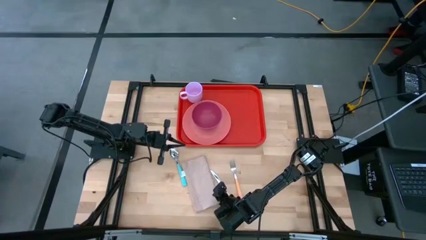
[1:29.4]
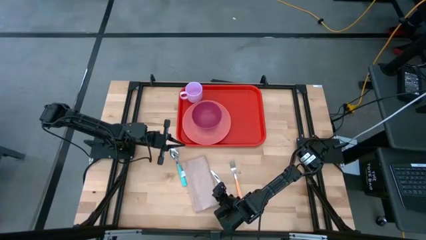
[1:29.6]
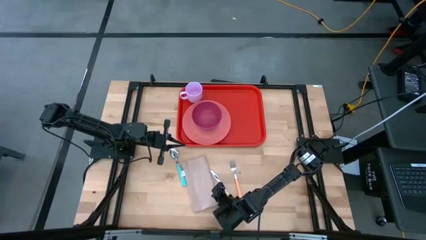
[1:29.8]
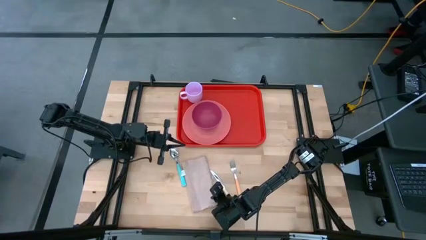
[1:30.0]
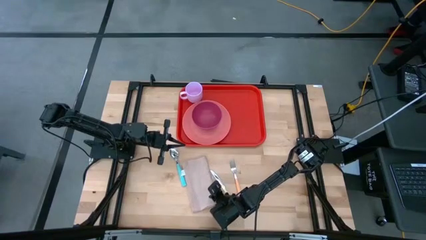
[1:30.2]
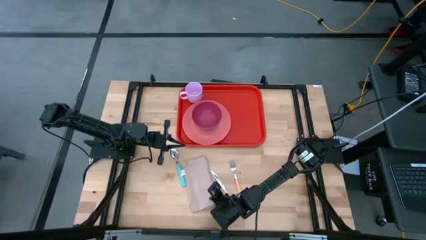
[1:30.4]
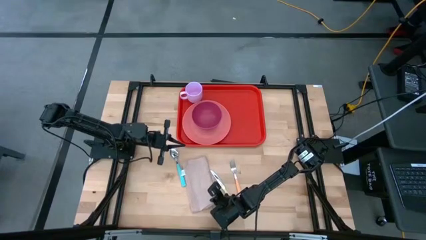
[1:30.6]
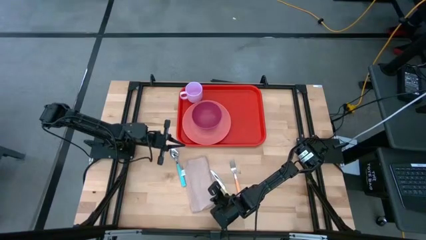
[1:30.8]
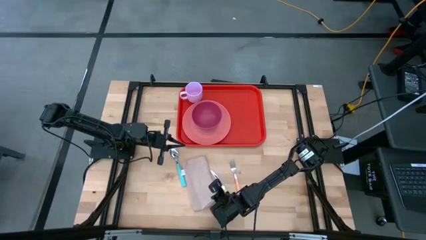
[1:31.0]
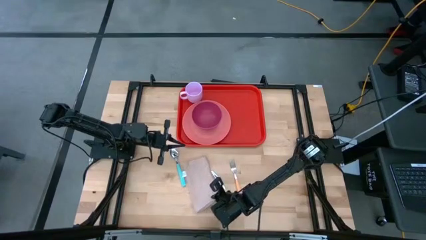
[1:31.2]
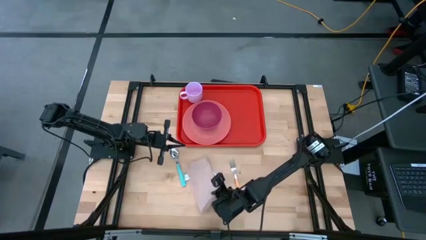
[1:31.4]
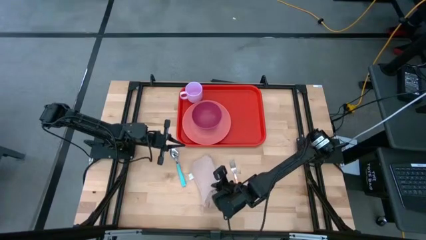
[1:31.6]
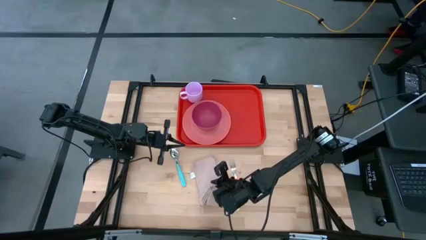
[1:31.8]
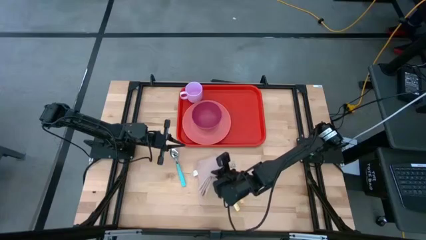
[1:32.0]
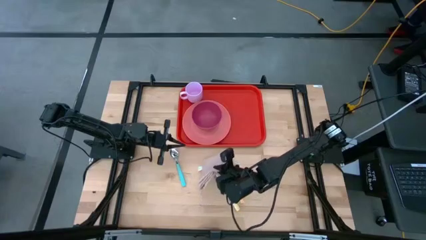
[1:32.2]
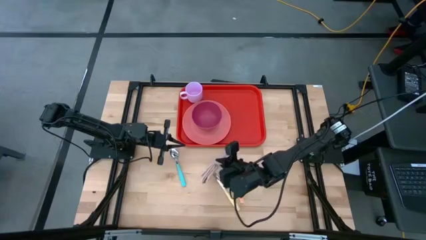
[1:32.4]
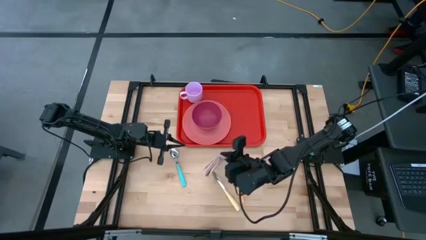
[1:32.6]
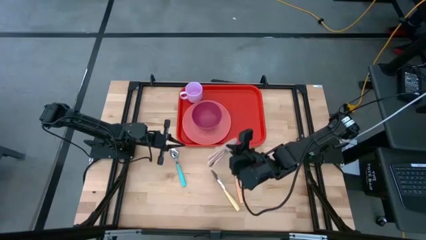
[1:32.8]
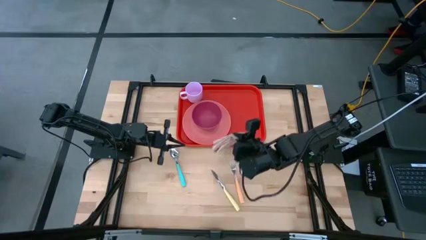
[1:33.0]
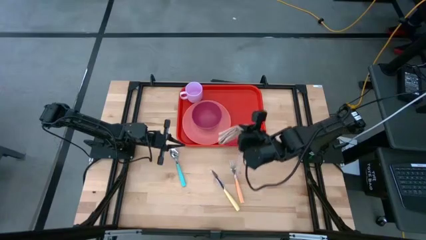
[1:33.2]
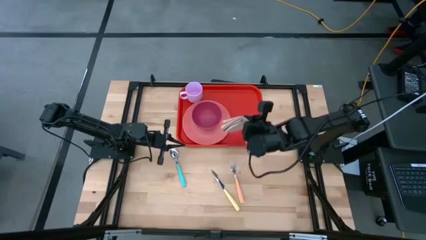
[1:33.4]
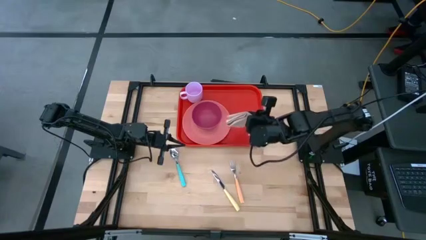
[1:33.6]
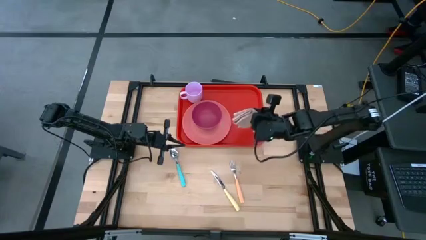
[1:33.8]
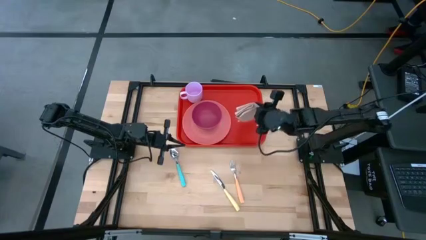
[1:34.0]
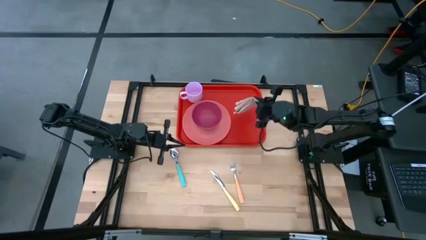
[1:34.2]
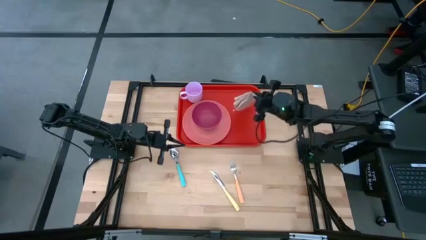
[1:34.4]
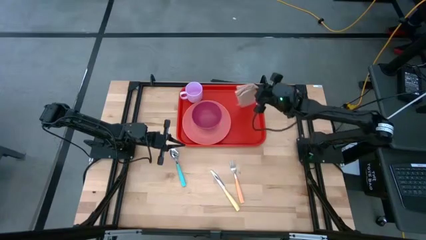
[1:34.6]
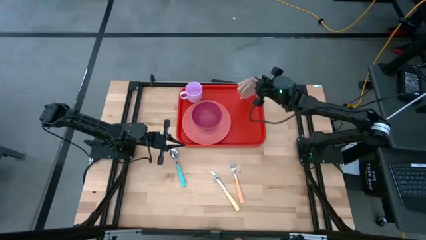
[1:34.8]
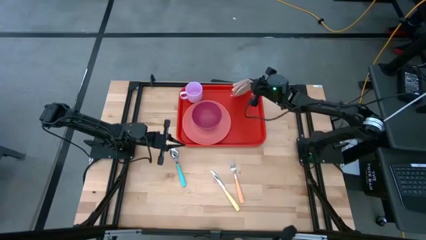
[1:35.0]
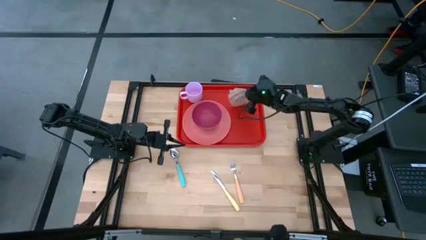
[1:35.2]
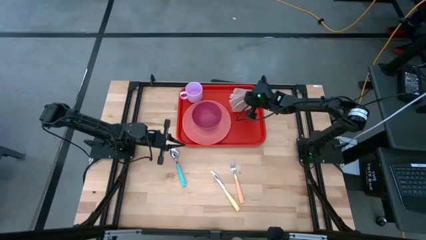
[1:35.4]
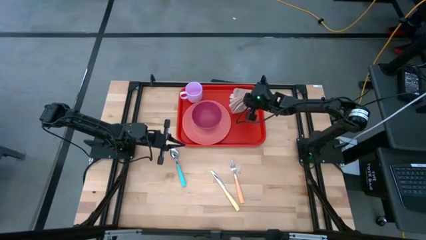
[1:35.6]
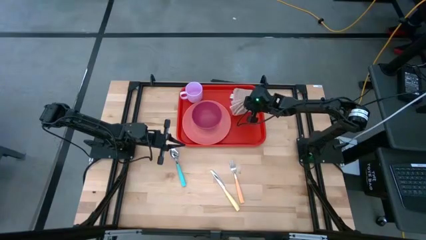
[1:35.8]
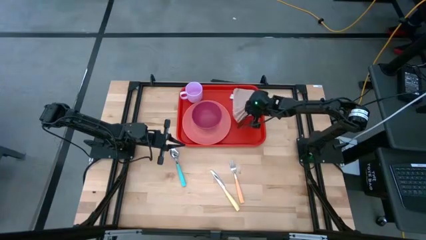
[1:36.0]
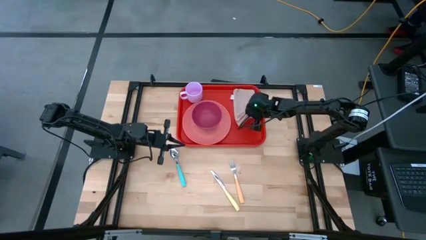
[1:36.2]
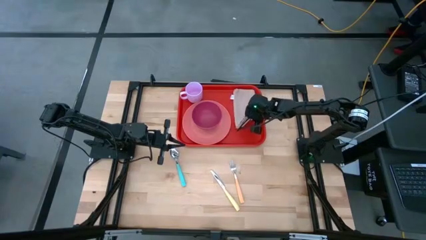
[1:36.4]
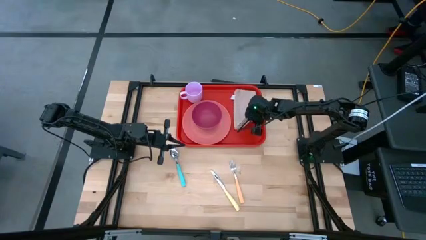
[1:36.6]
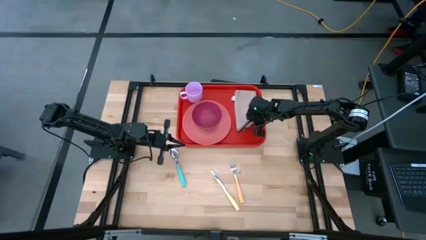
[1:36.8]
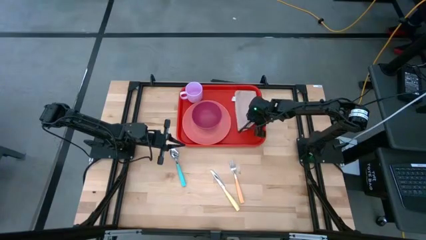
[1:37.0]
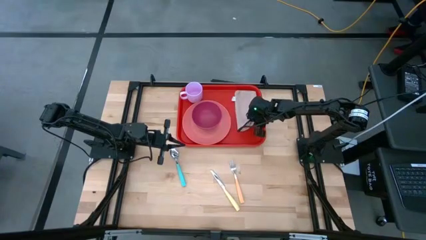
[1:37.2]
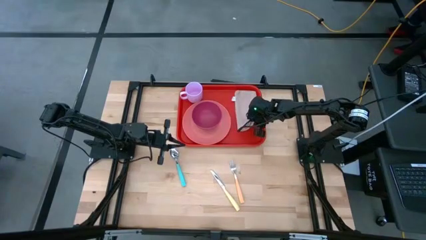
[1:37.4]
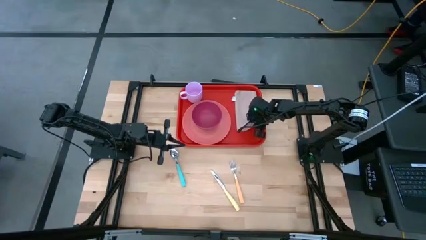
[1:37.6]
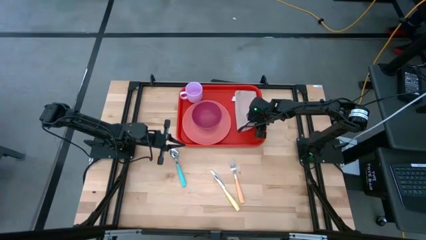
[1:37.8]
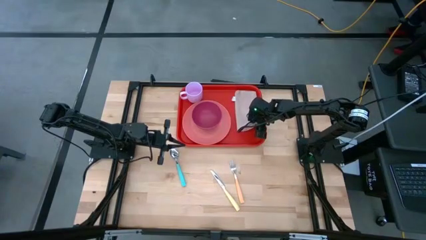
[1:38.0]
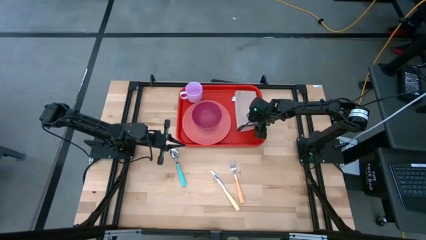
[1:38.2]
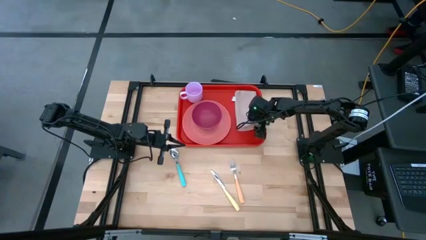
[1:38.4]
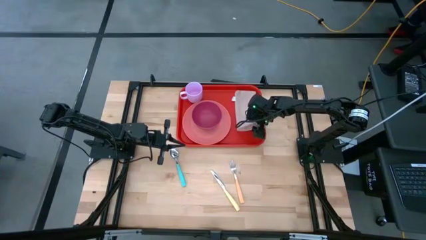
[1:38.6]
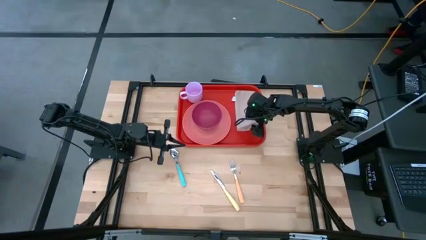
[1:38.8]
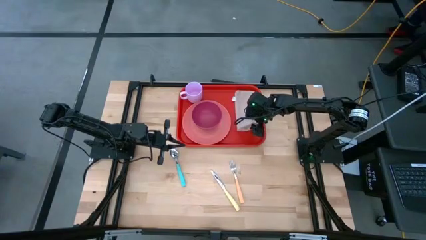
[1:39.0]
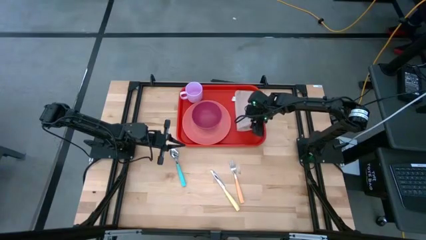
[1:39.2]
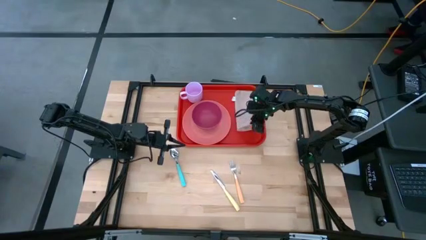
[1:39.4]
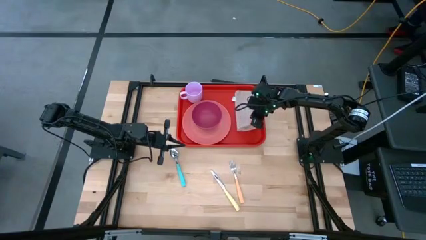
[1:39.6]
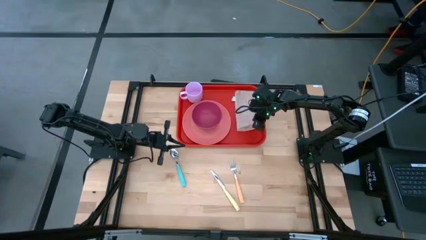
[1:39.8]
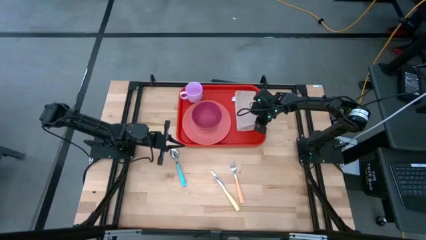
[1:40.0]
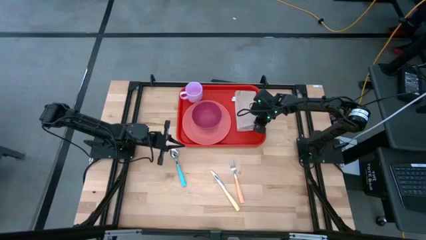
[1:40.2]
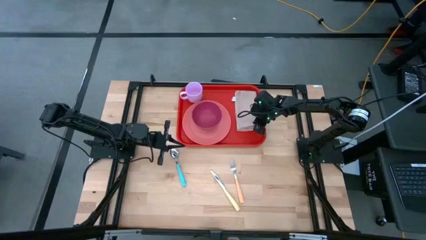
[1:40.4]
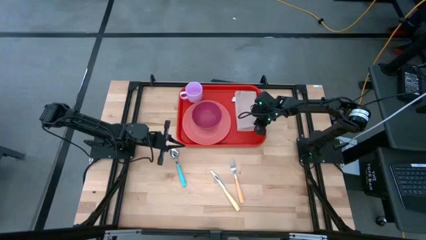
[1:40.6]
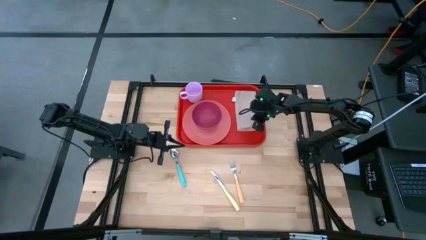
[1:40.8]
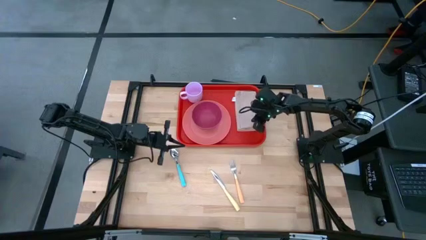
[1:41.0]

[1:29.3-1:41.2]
Task: Set up tray
Put the light brown table napkin to the right side of the plate on the tray
